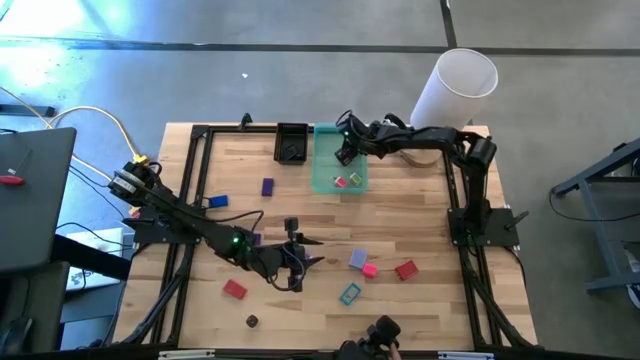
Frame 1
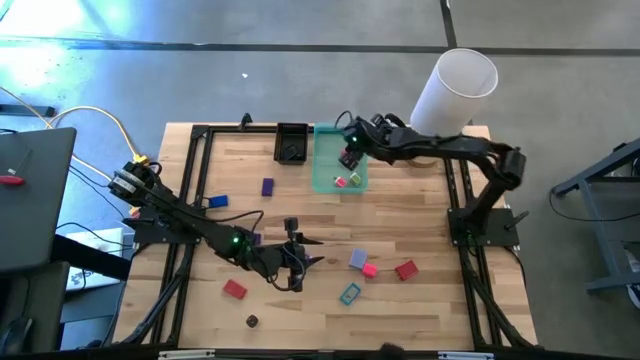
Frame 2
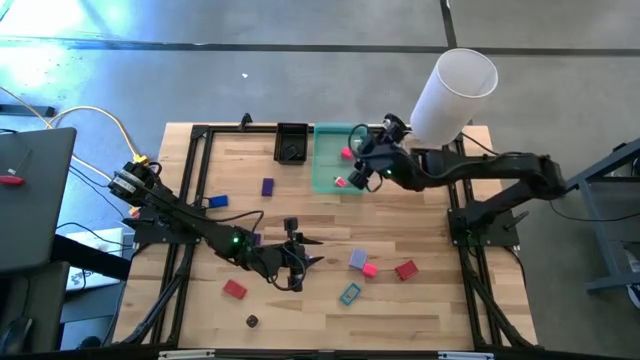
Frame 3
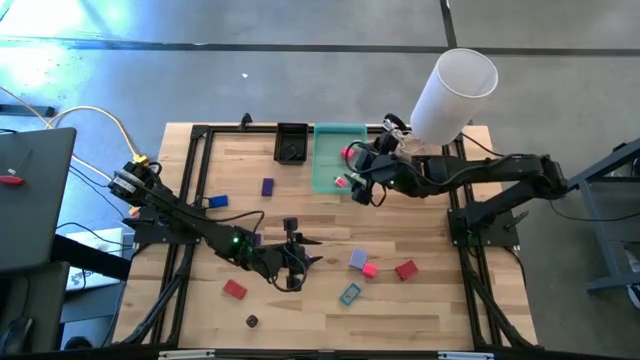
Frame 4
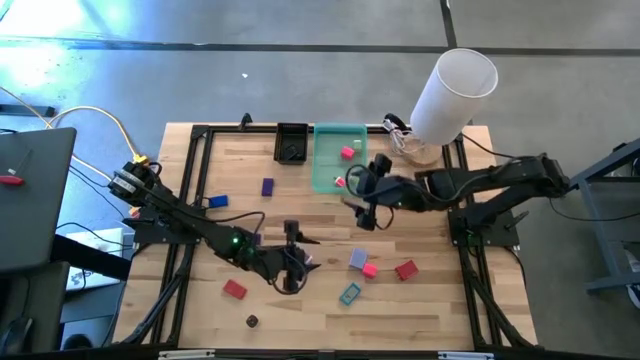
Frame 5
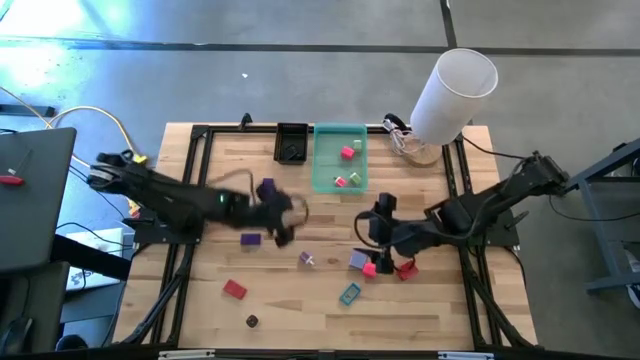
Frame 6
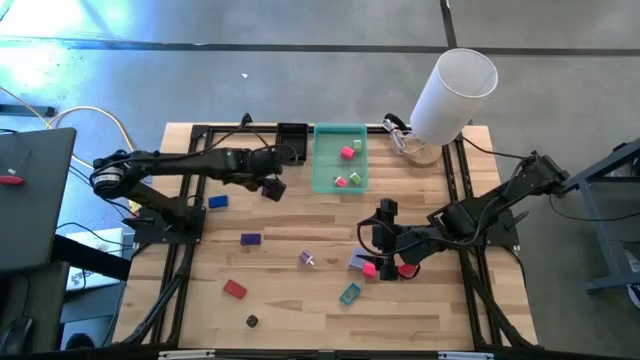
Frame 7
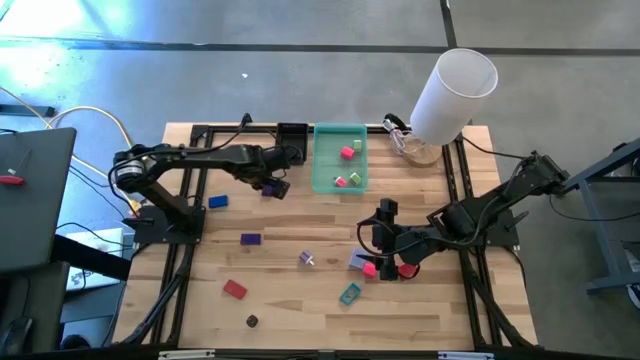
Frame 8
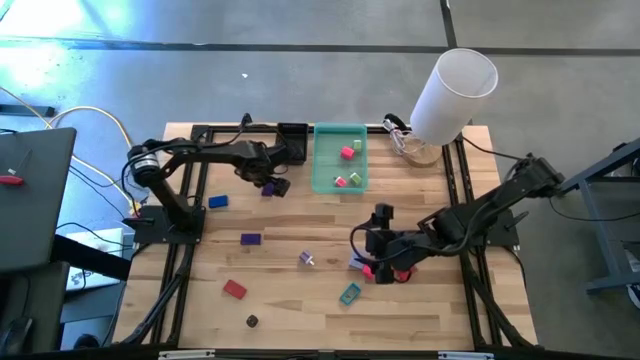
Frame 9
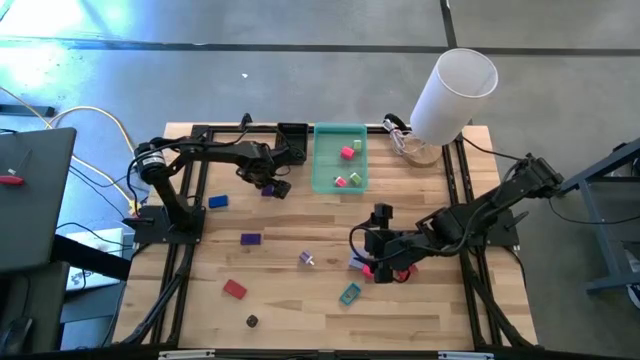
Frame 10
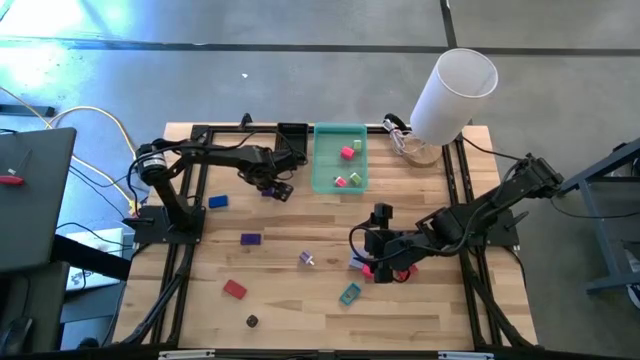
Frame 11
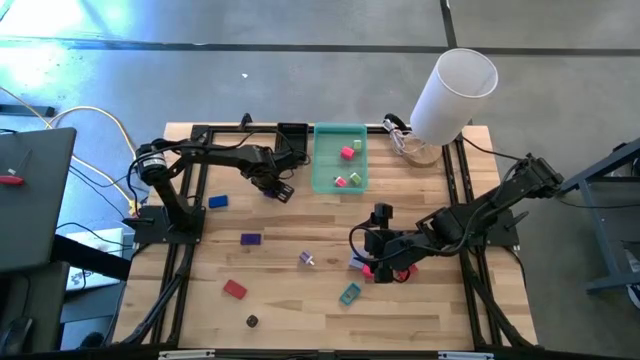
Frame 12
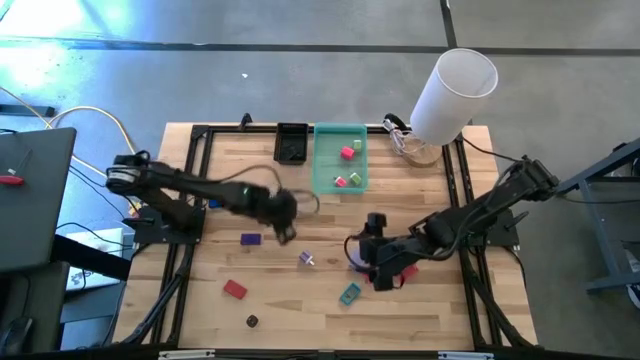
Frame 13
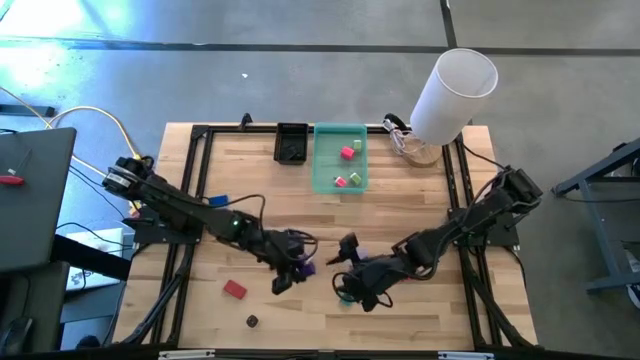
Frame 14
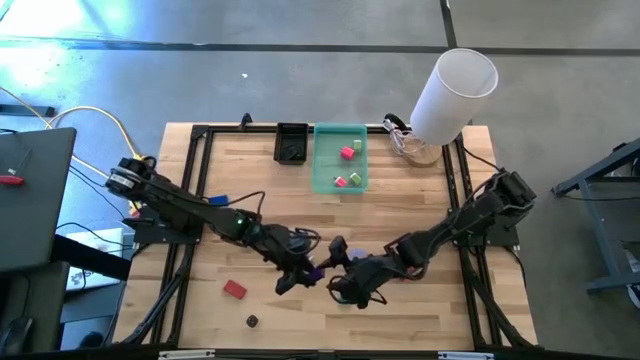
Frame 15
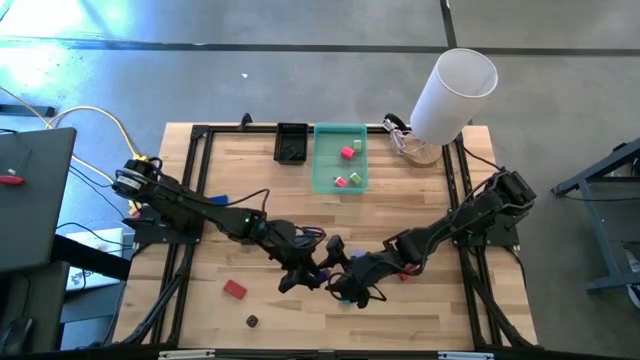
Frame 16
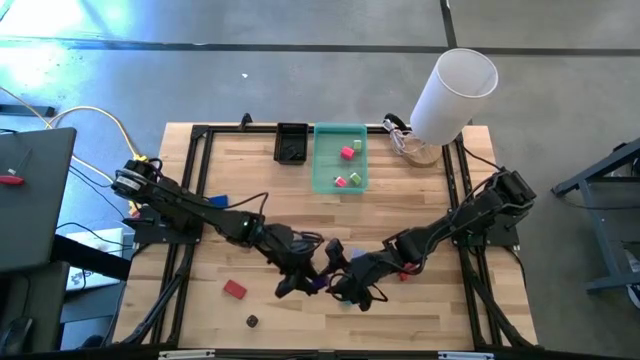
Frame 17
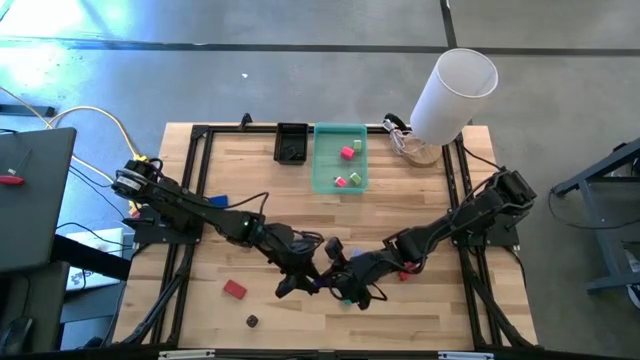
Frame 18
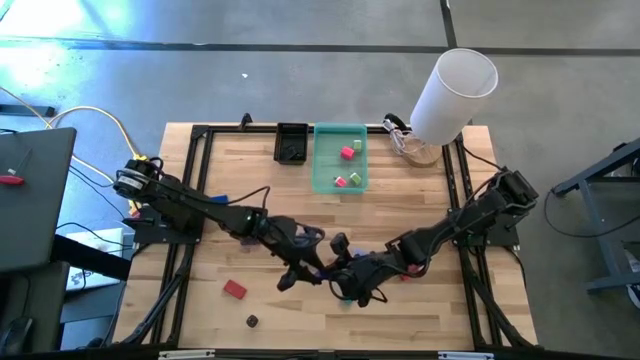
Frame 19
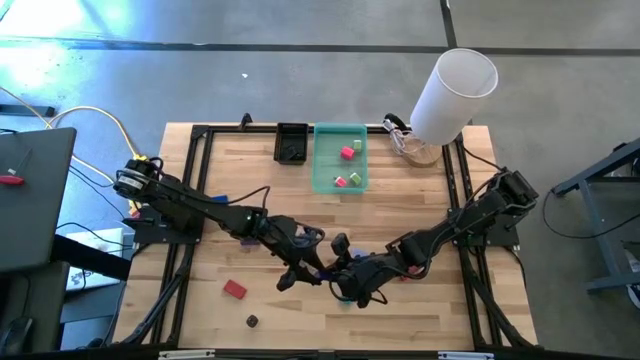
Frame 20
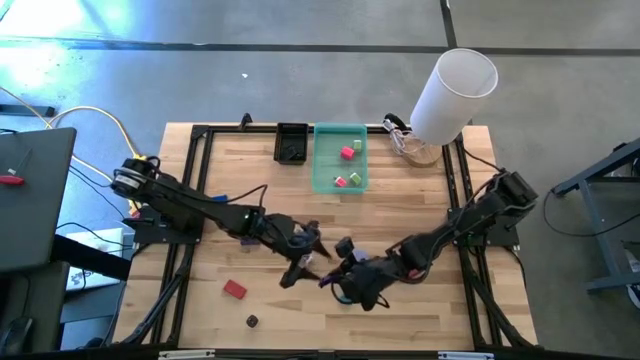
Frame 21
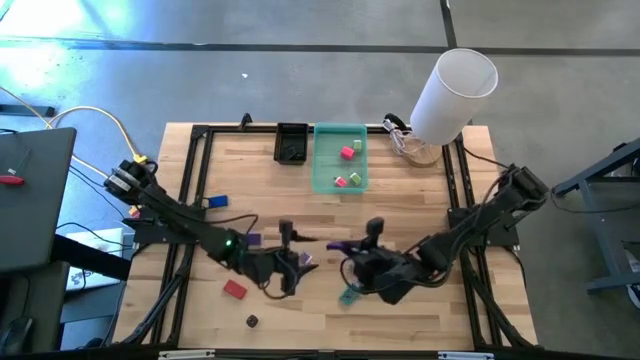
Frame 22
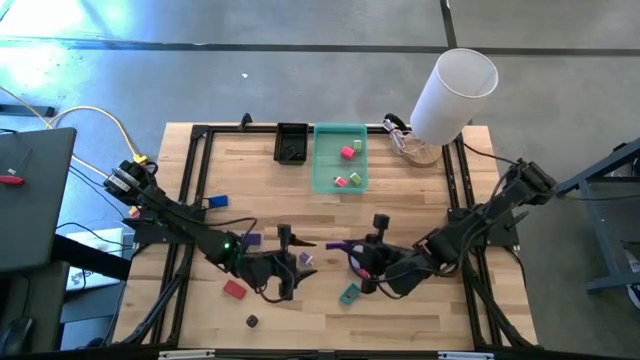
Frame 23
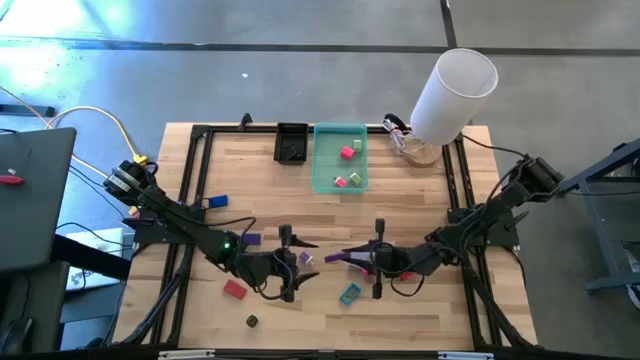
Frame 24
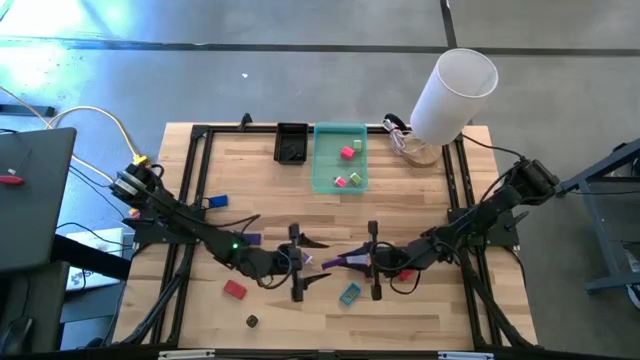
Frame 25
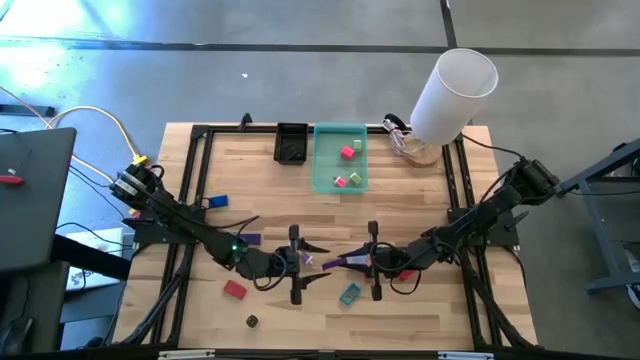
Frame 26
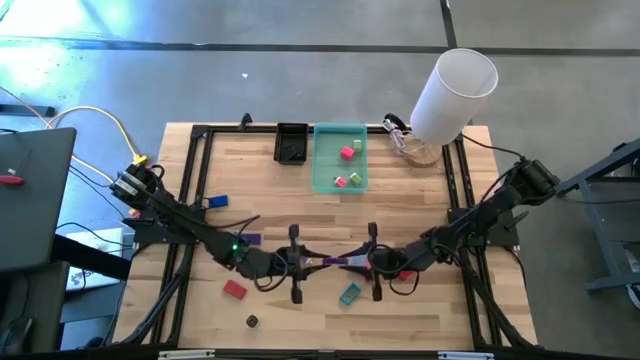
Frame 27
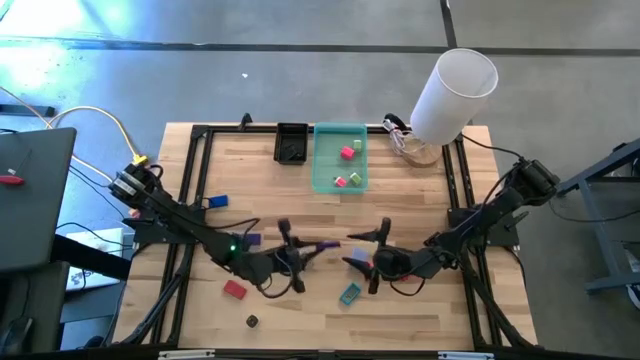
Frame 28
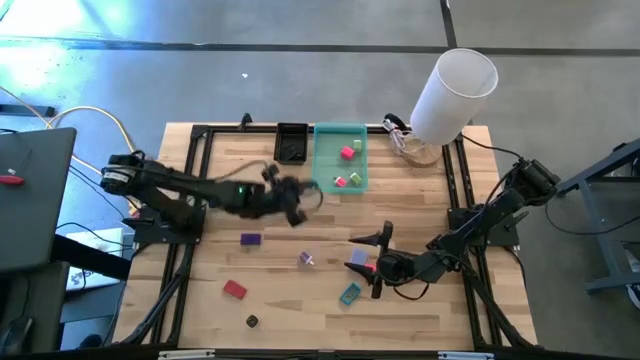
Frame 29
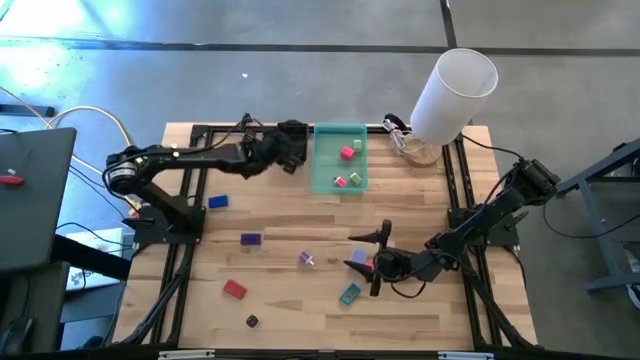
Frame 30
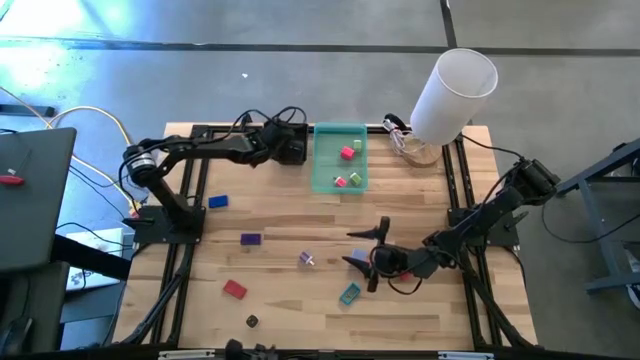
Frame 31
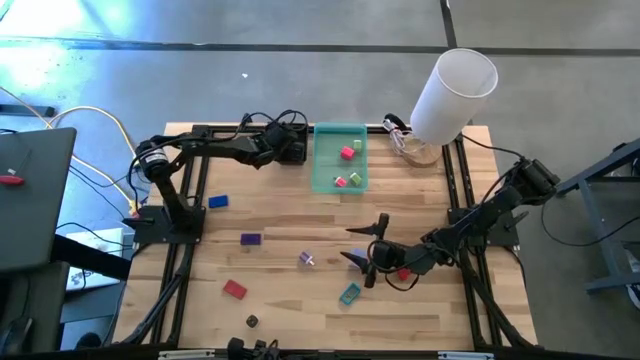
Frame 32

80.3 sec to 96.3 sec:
Task: Pick & Place Office items
Put the top purple digital clock into the black bin

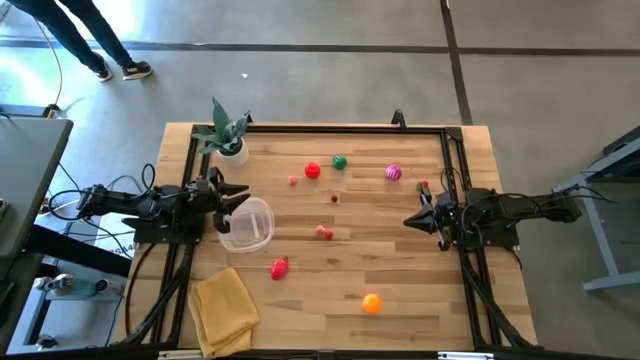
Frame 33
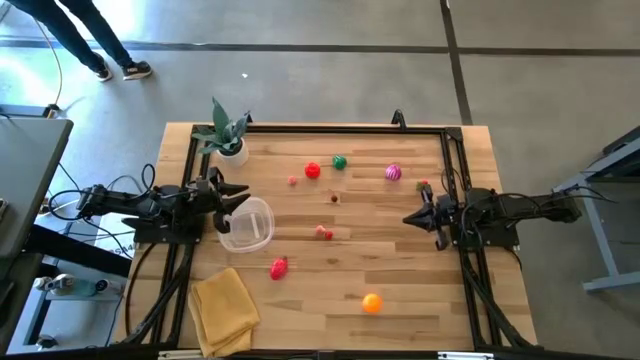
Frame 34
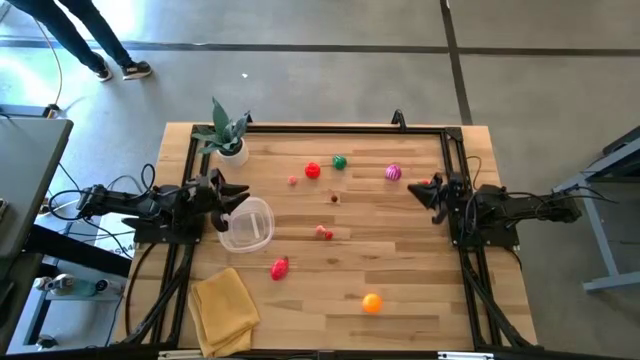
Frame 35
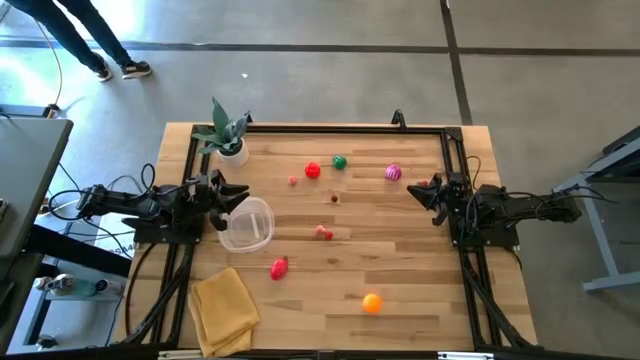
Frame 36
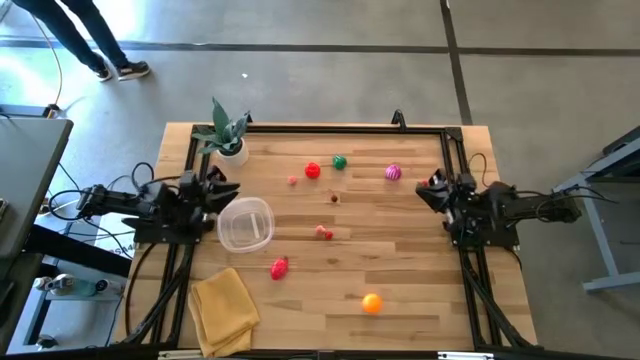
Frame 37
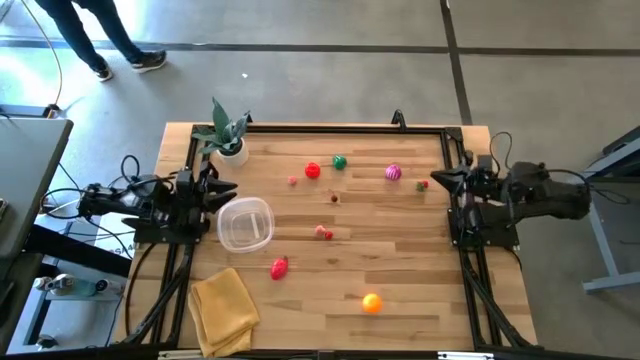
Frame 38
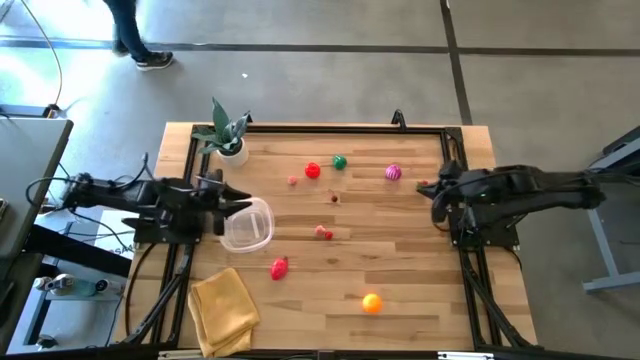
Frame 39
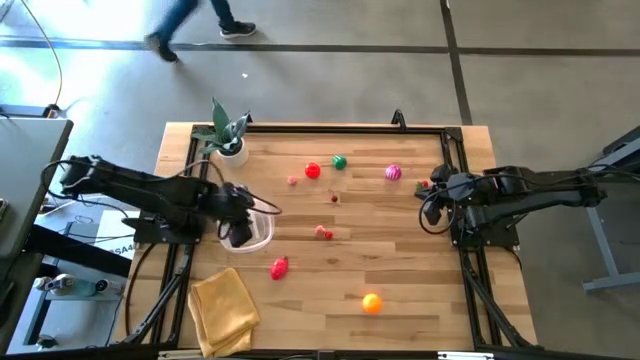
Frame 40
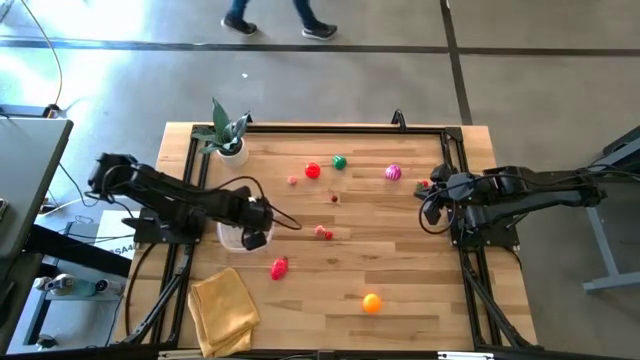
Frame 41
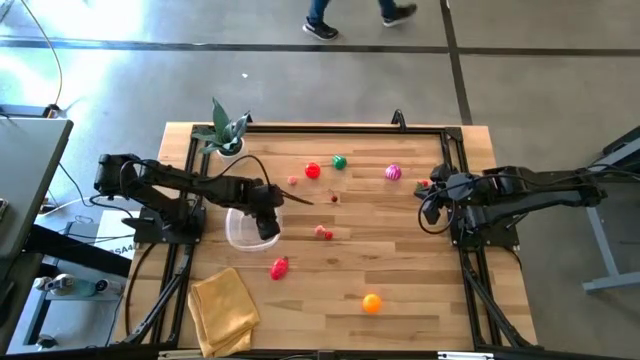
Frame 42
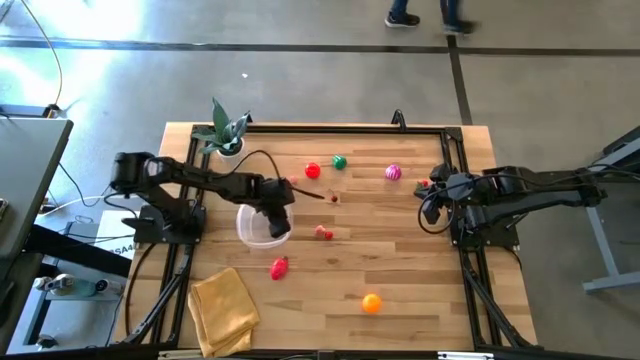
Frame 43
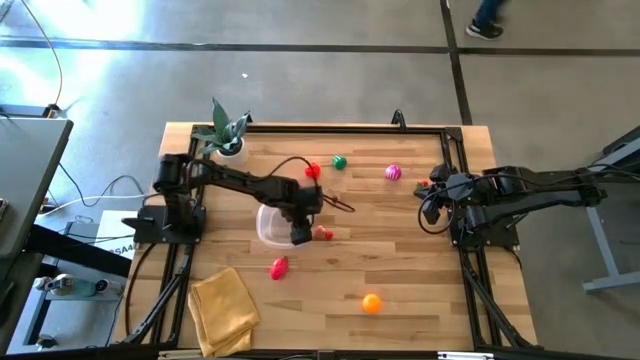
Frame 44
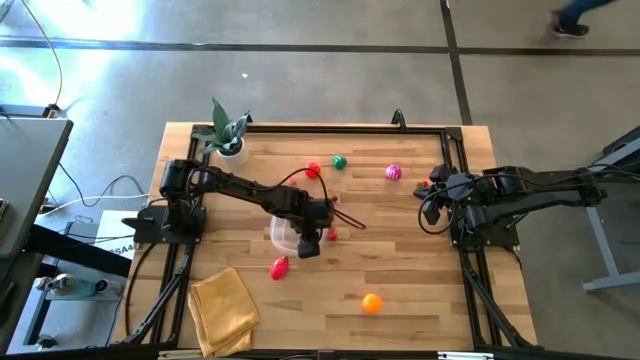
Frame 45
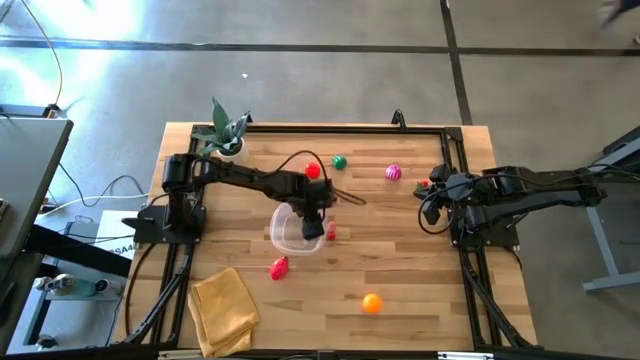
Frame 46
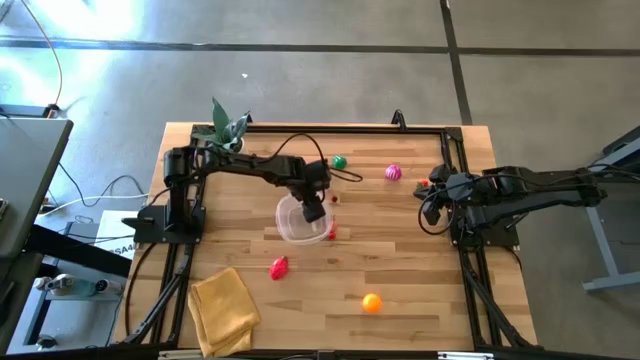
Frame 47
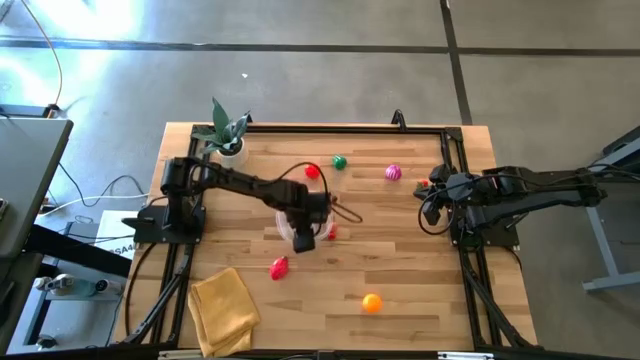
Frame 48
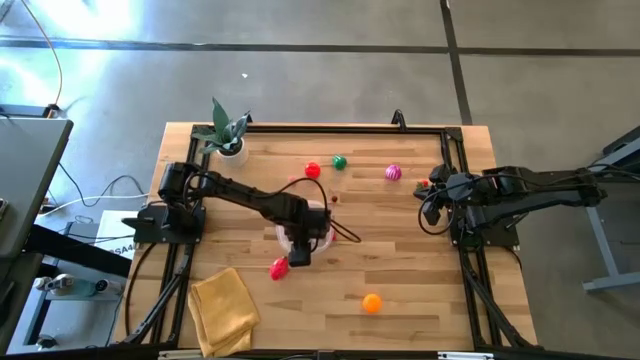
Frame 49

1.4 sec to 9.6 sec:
Task: Pick and placing Produce into tupperware
Prepare the transparent container
